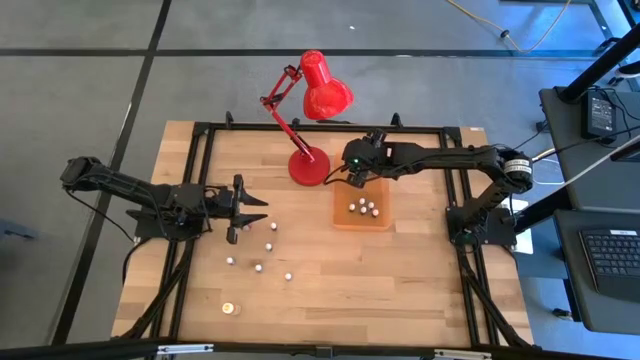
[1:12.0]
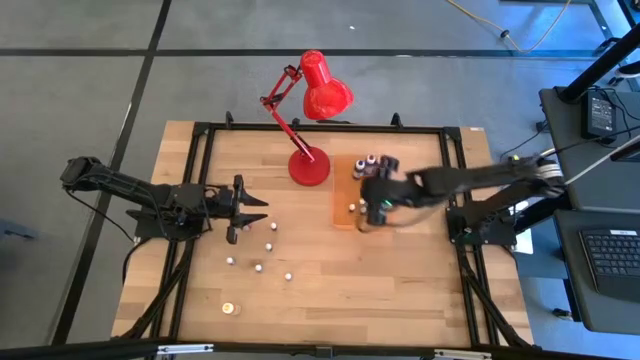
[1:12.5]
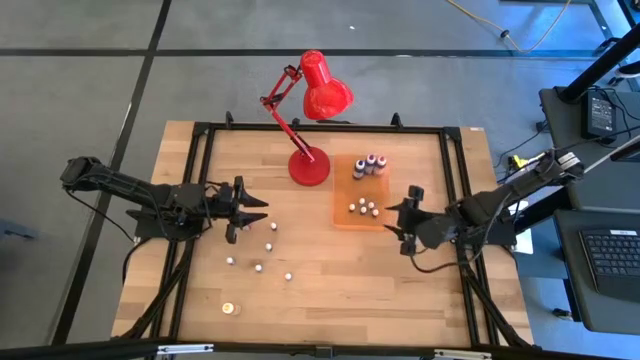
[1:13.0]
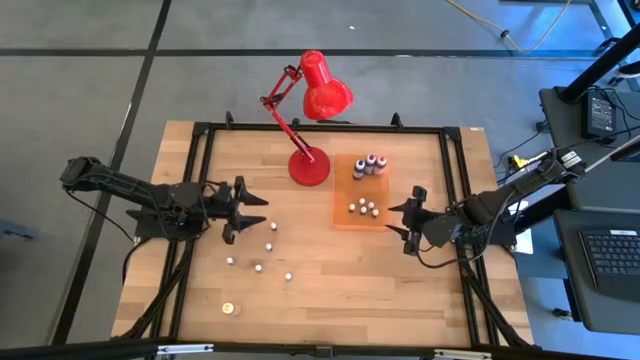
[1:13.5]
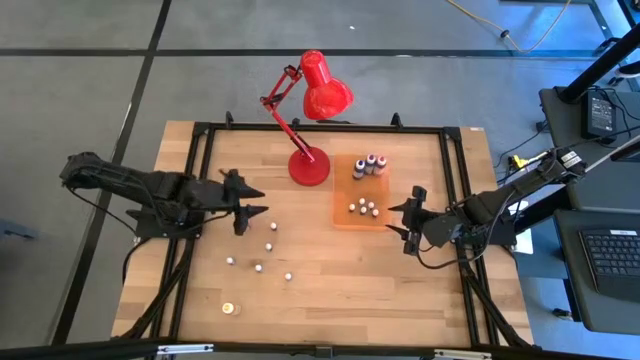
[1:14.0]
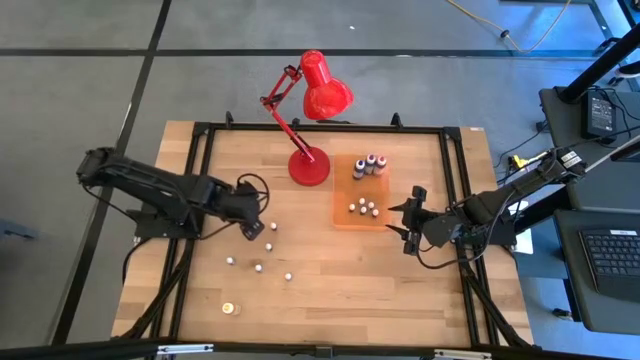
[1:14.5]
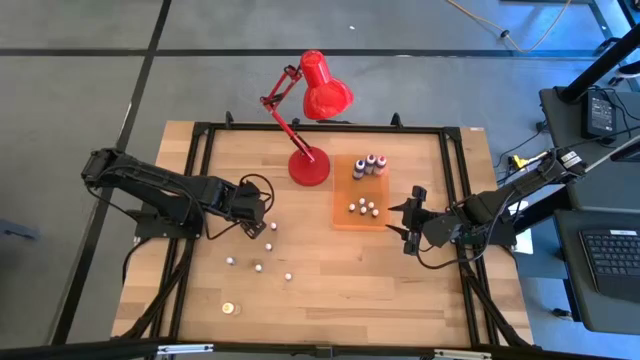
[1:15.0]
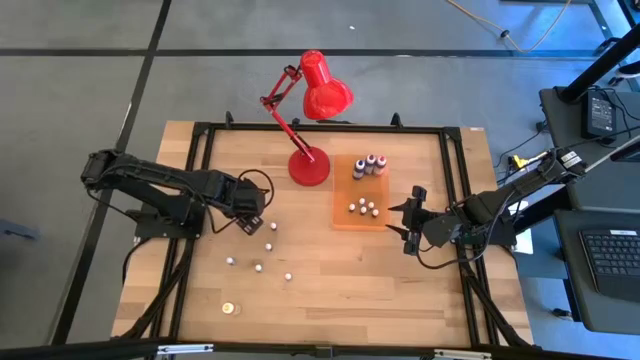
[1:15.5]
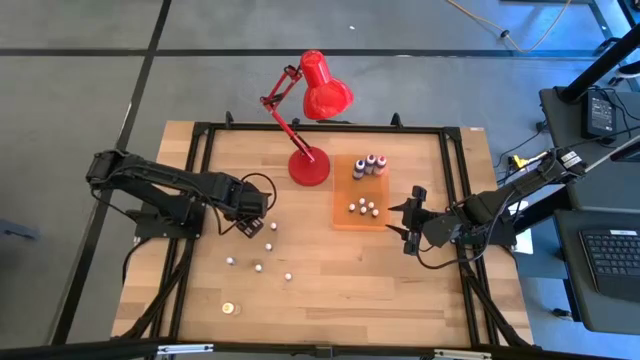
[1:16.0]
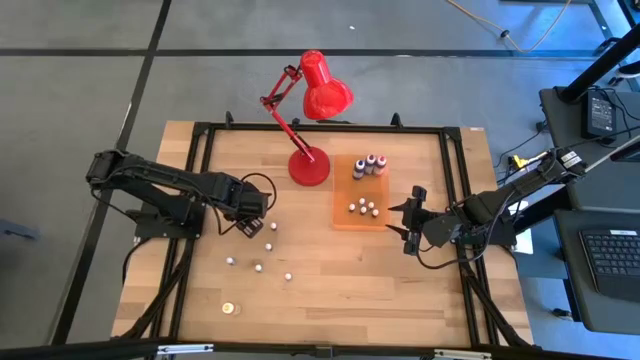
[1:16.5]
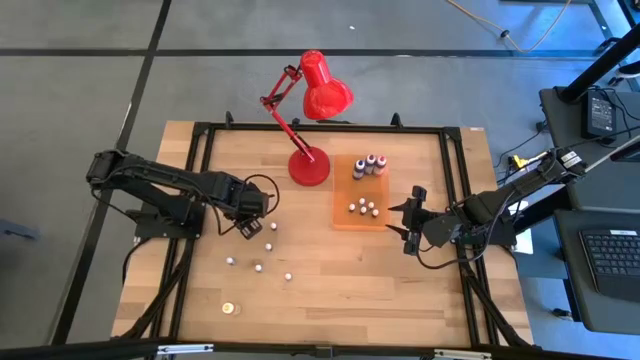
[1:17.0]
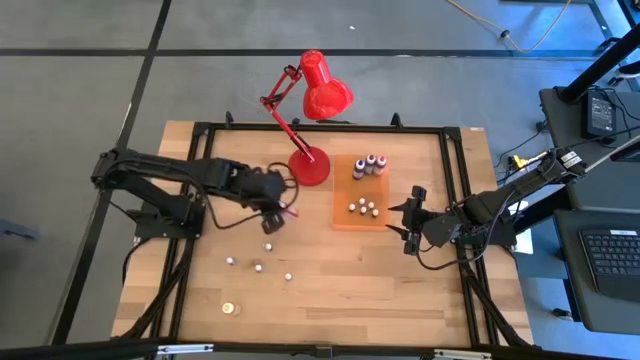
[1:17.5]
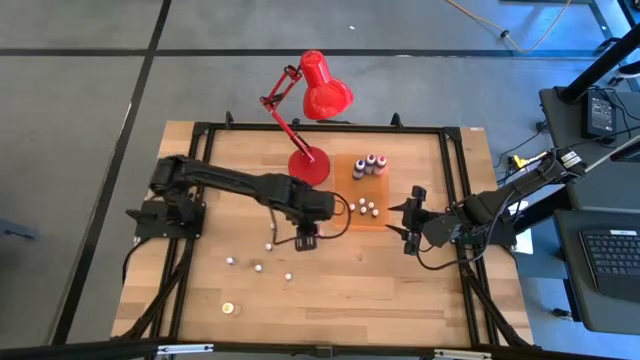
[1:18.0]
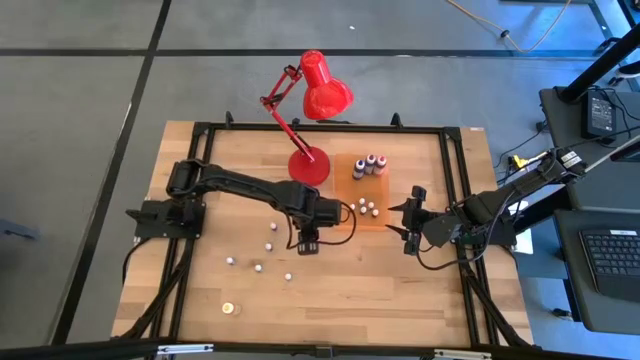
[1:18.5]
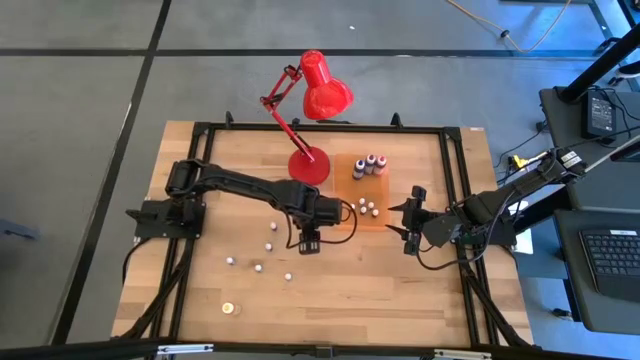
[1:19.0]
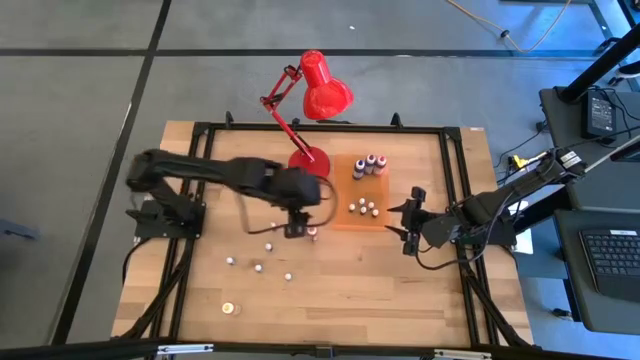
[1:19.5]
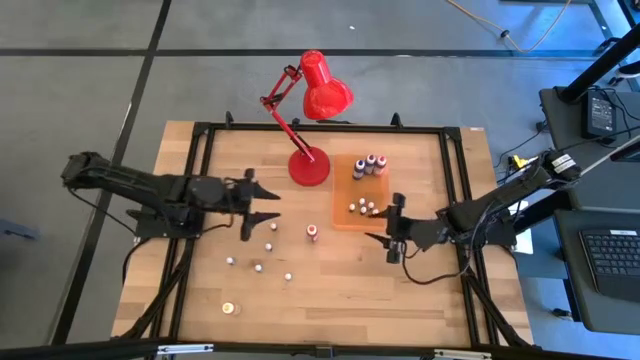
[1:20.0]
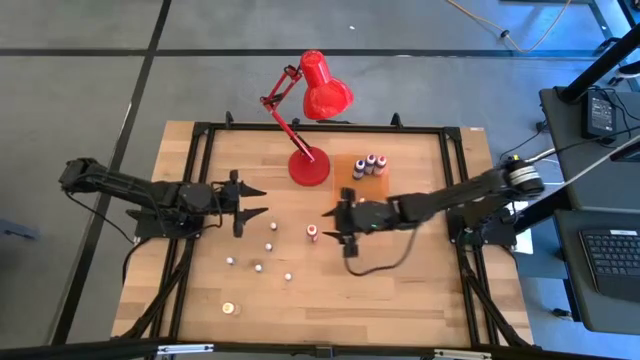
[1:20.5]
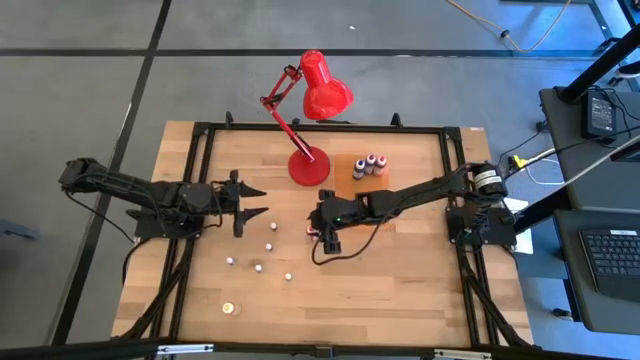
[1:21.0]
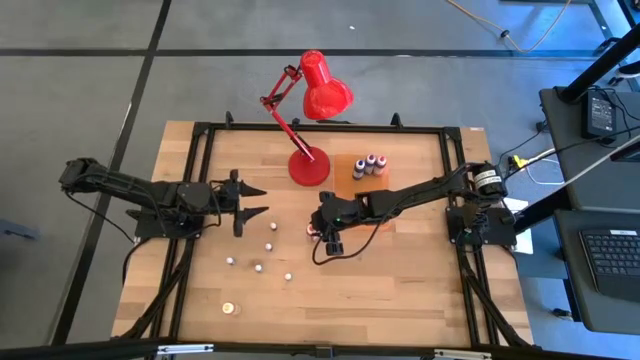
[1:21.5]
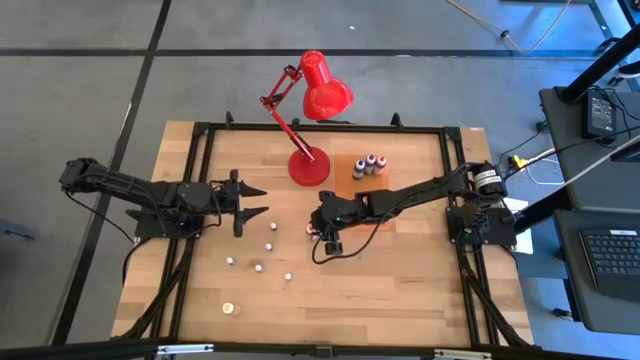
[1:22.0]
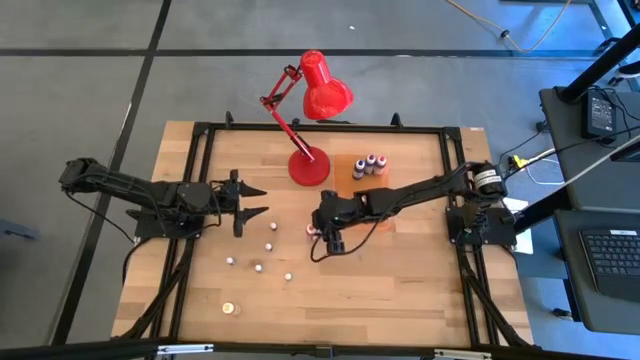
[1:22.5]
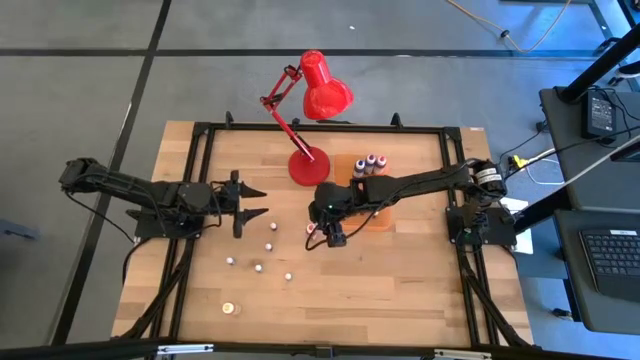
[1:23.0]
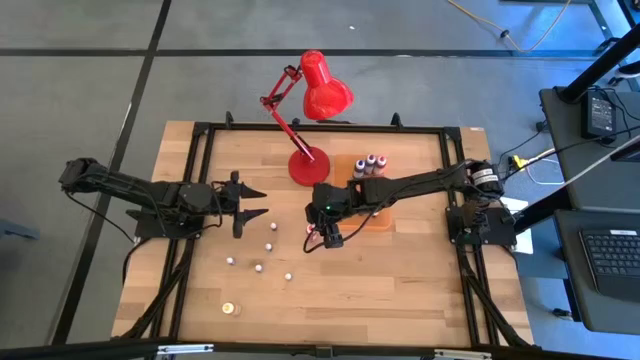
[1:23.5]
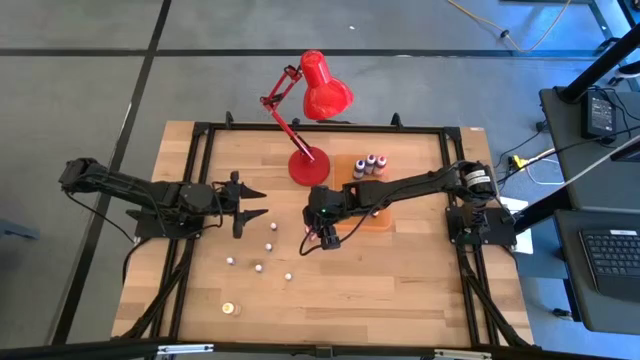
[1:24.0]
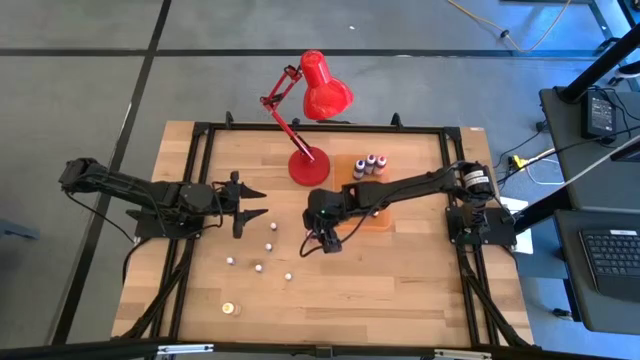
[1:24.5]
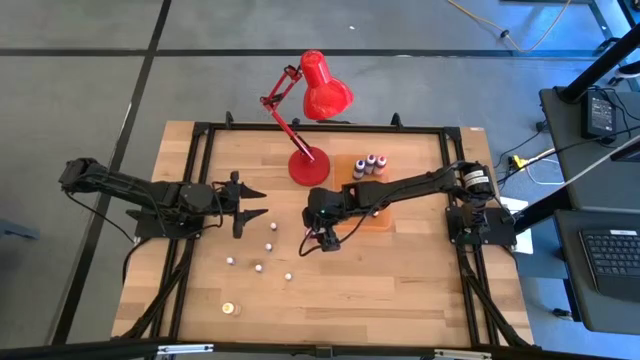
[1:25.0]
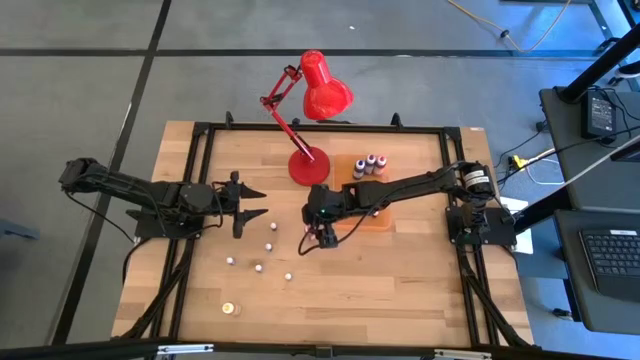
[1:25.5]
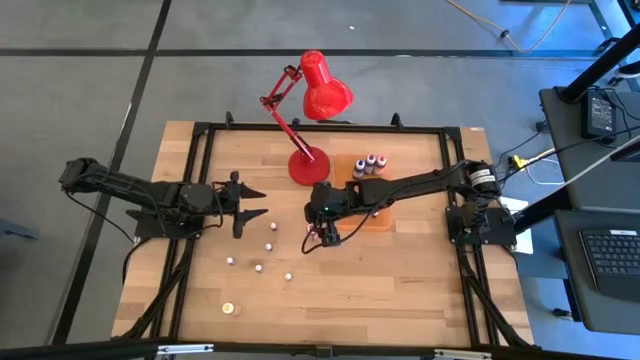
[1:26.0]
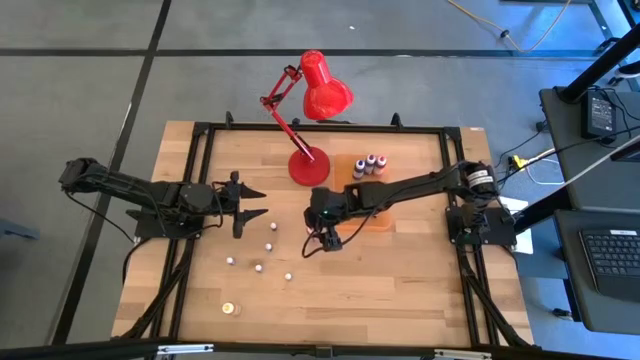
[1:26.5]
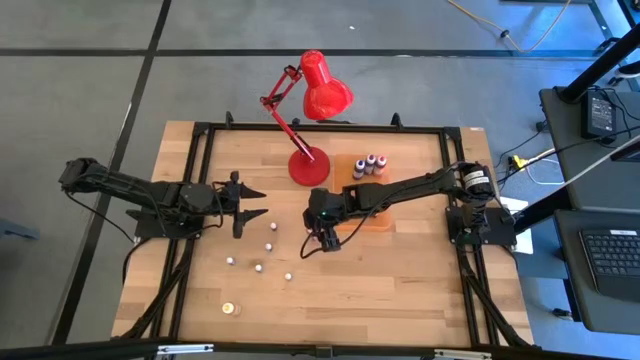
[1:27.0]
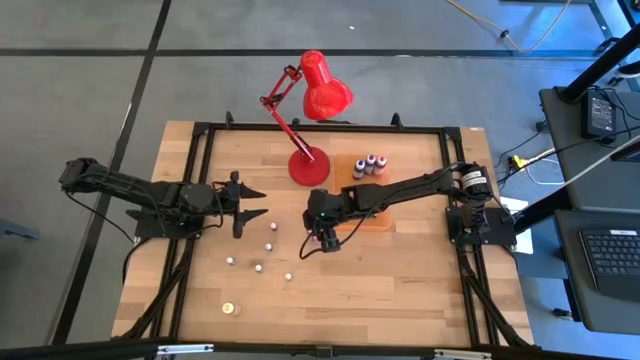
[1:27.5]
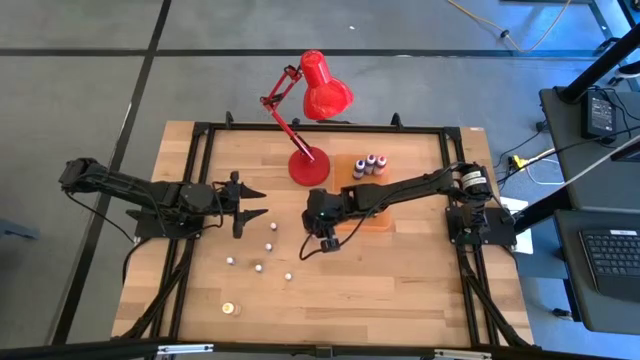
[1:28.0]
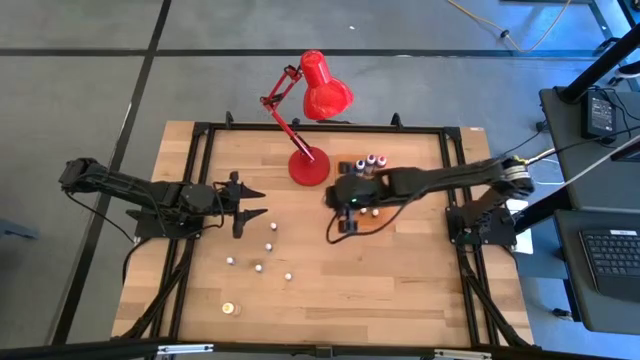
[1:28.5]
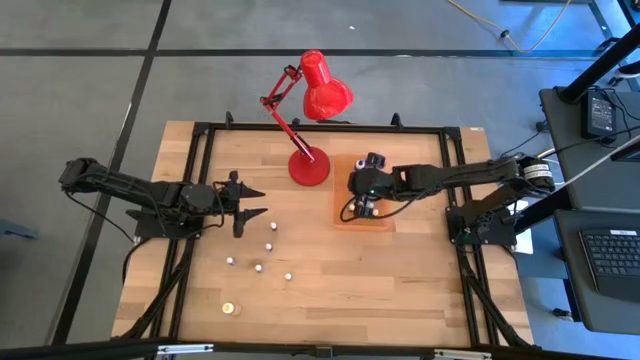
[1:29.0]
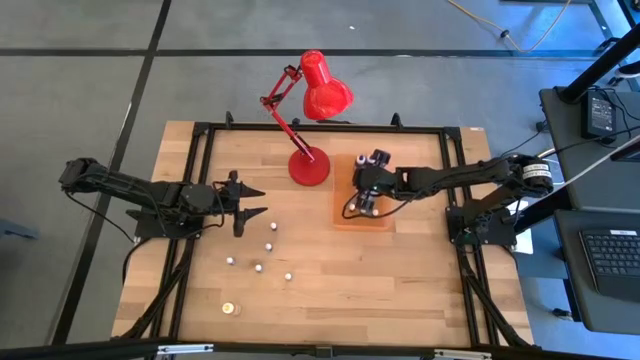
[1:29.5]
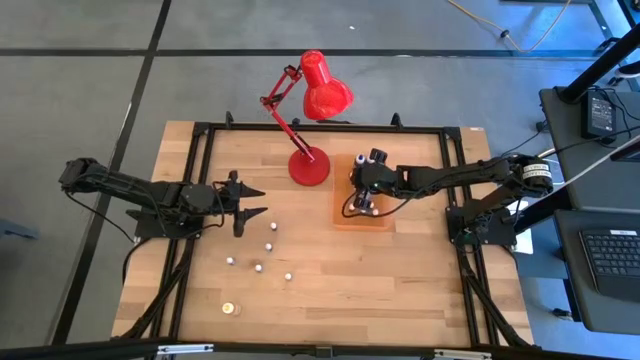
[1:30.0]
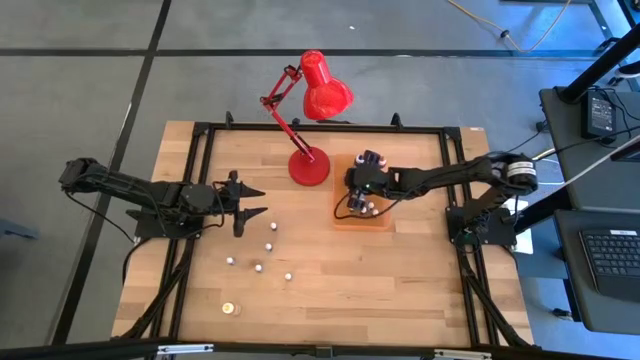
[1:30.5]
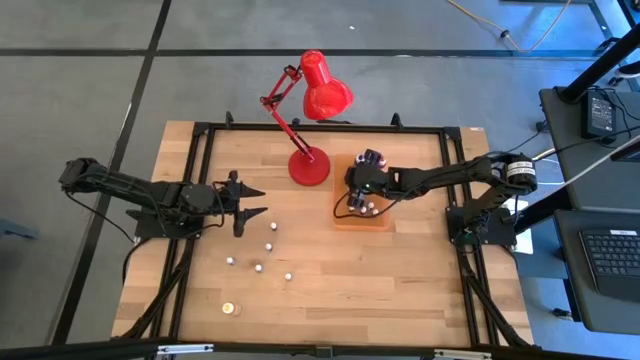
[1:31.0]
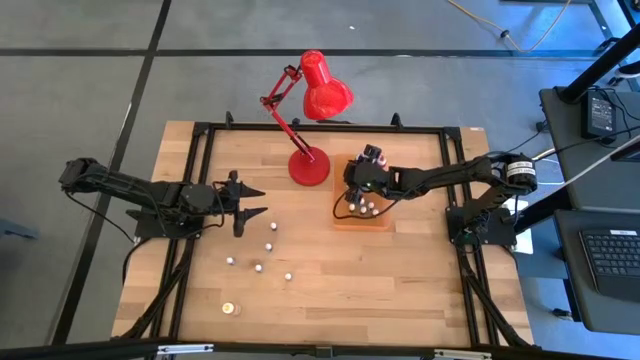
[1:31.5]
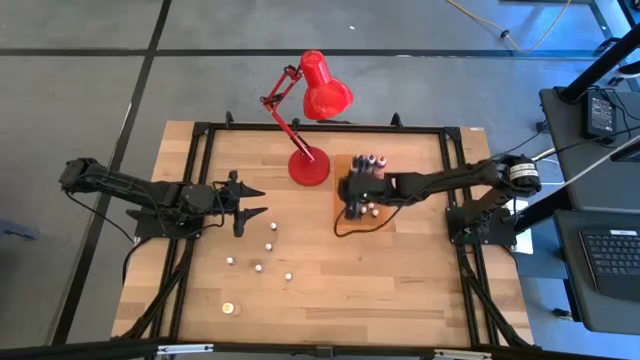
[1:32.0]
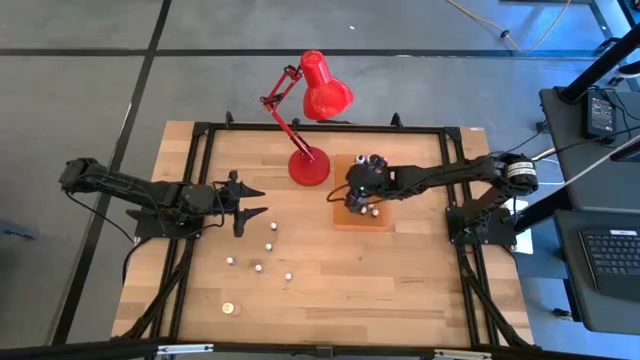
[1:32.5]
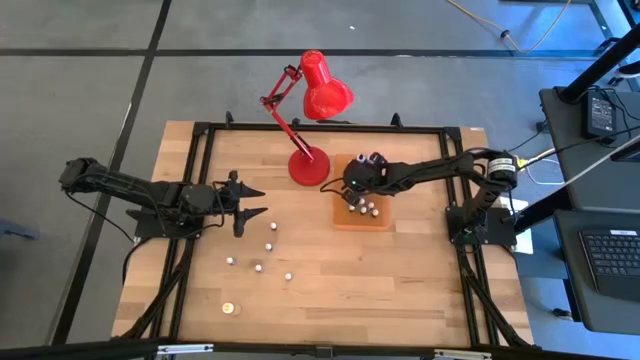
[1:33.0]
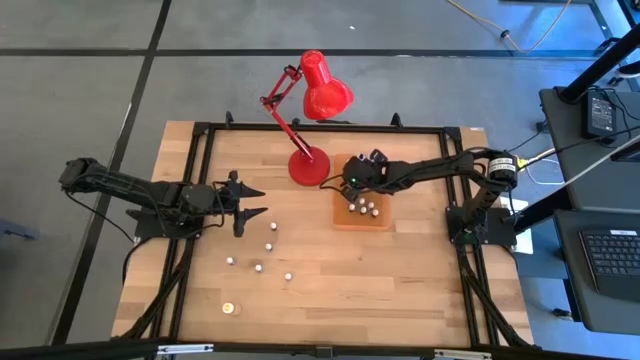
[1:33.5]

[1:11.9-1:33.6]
Task: Pick & Place food coloring
Put the large orange food coloring bottle into the orange bin
